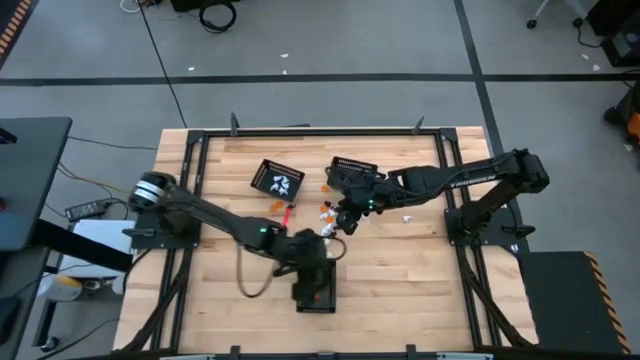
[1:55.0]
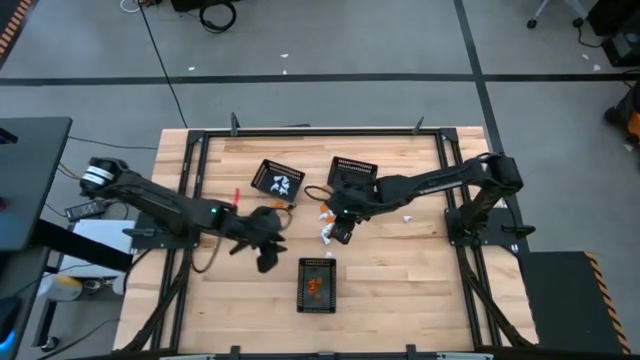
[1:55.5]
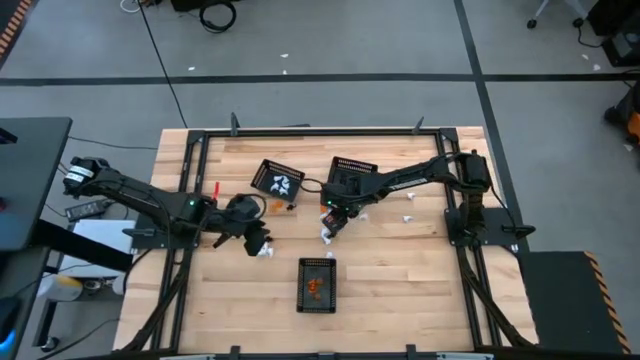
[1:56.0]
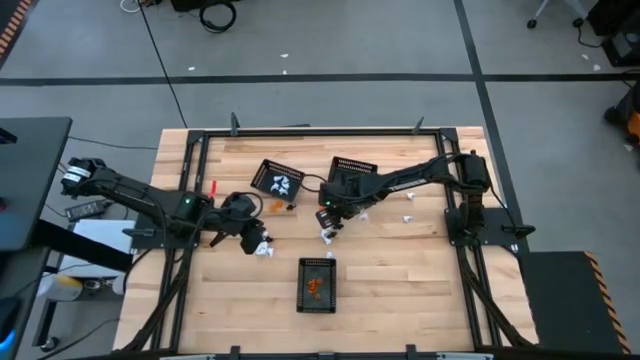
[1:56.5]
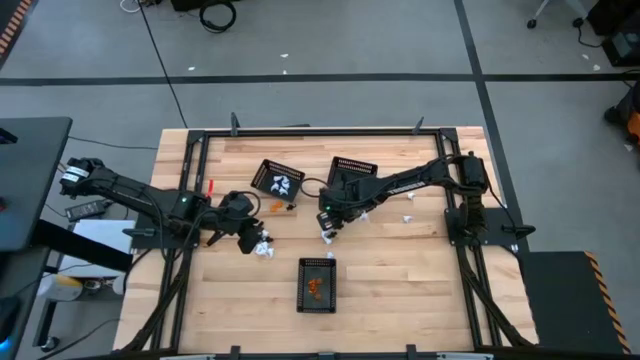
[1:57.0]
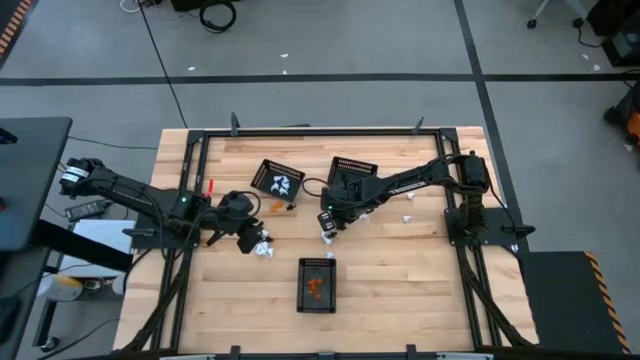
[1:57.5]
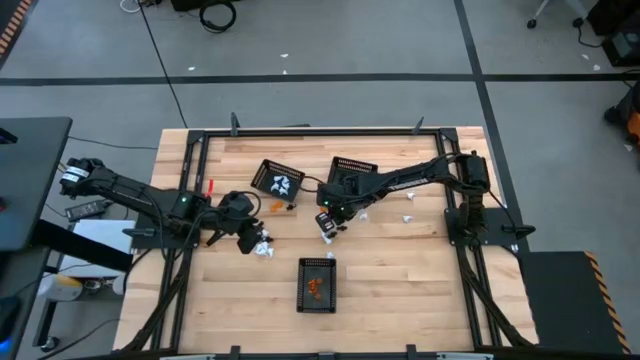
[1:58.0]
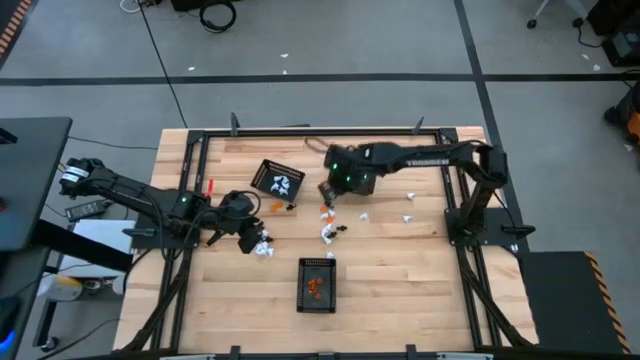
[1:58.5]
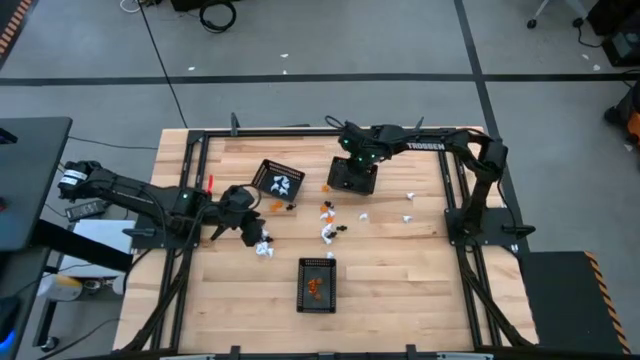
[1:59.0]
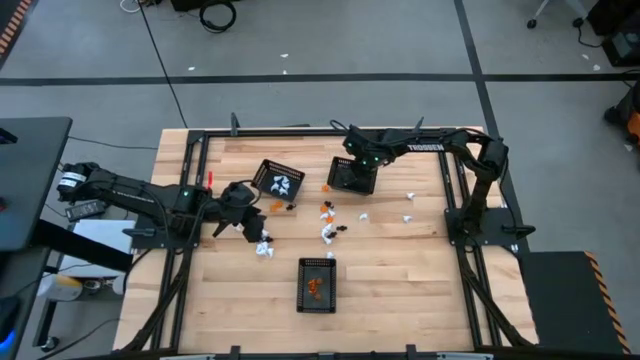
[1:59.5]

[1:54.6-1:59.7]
Task: Sort Halloween decoration
Put the black skeleton toy into the top right black basket

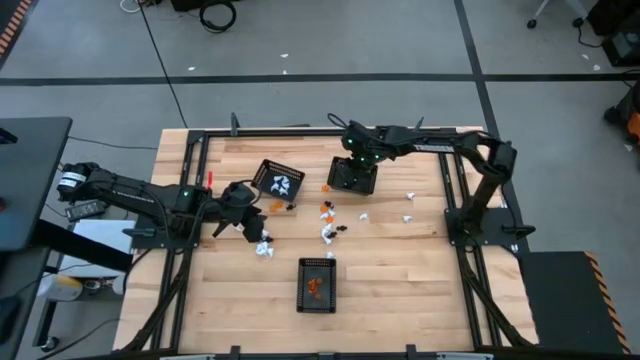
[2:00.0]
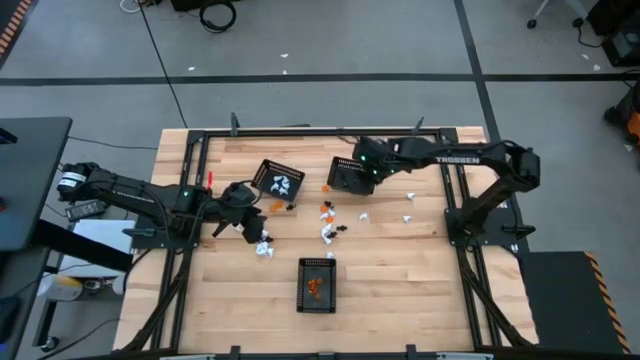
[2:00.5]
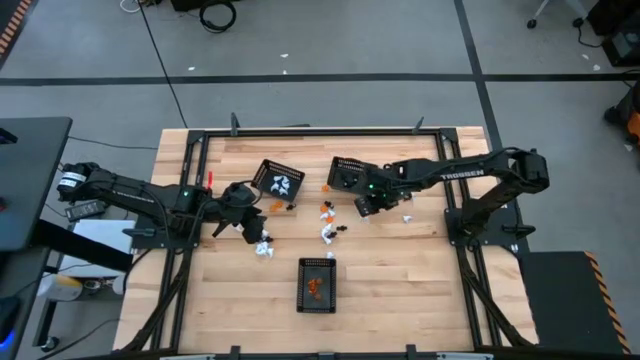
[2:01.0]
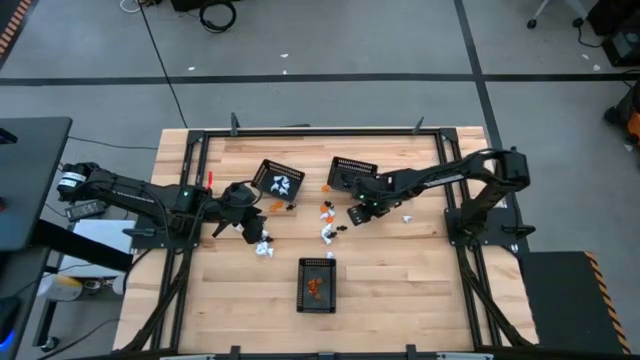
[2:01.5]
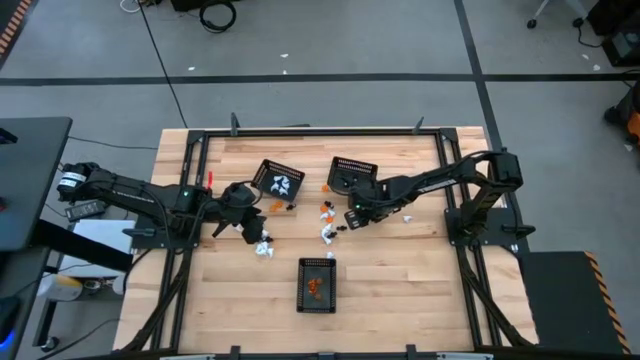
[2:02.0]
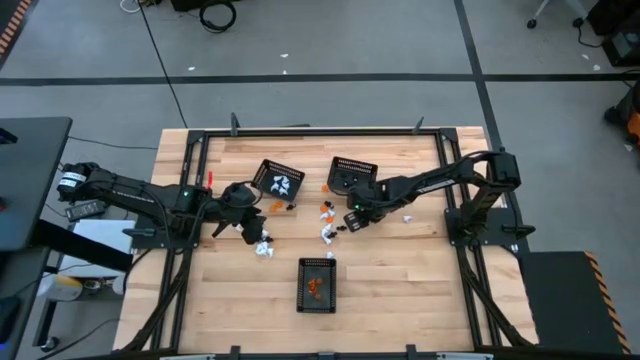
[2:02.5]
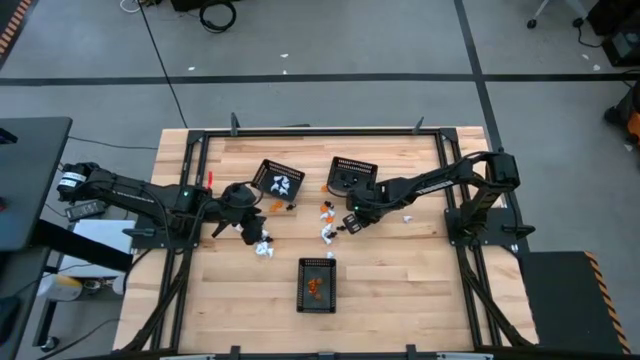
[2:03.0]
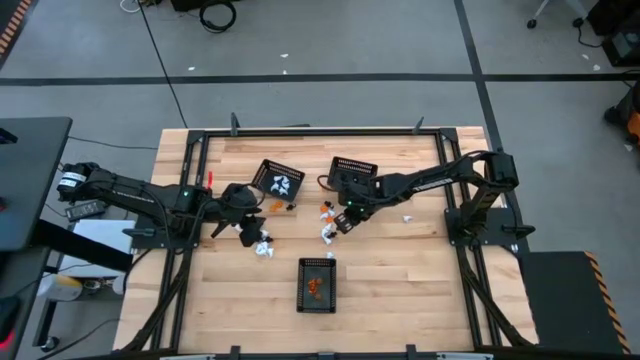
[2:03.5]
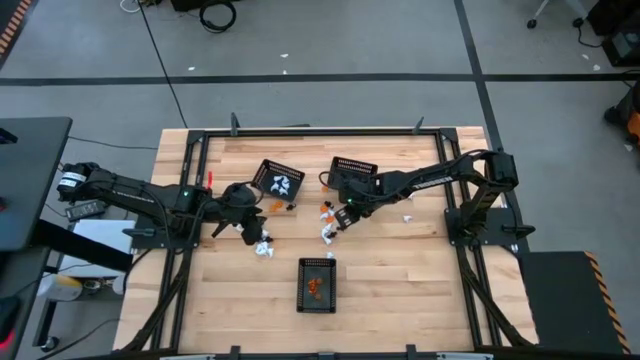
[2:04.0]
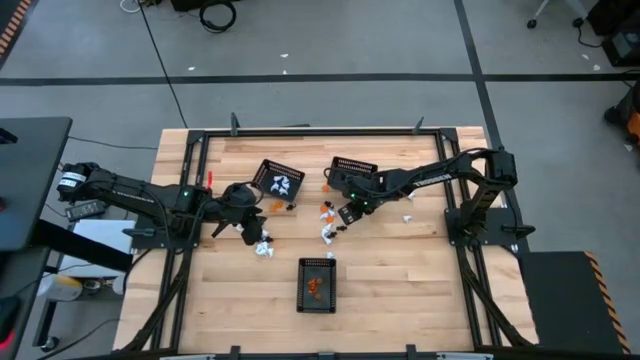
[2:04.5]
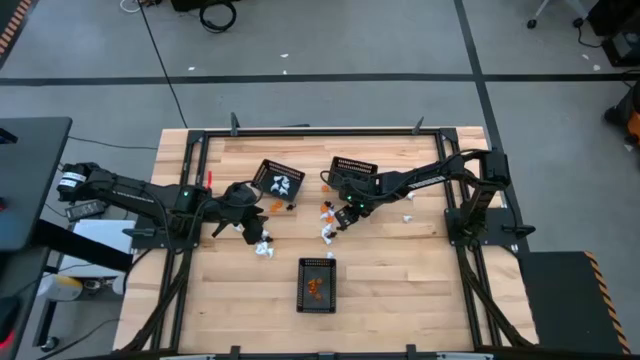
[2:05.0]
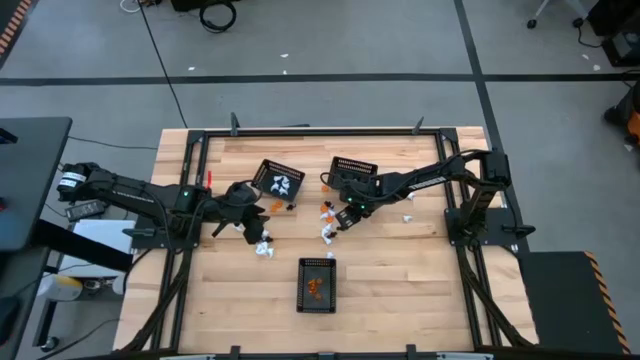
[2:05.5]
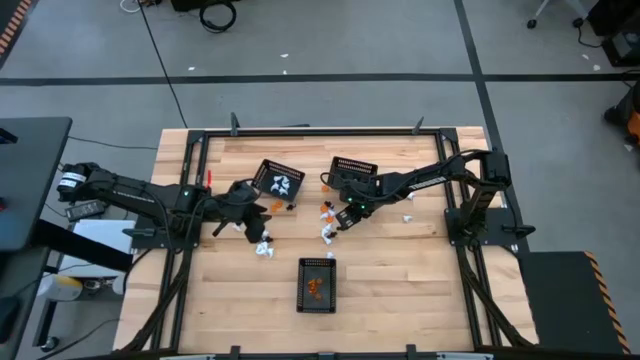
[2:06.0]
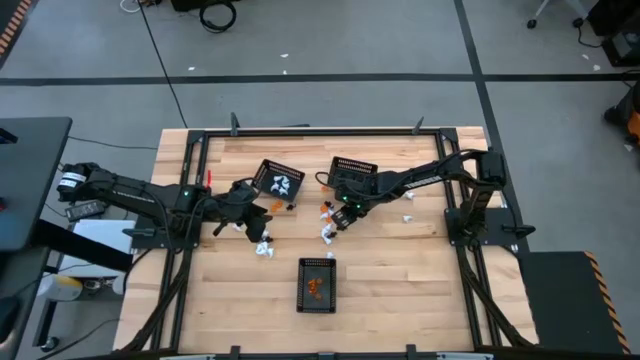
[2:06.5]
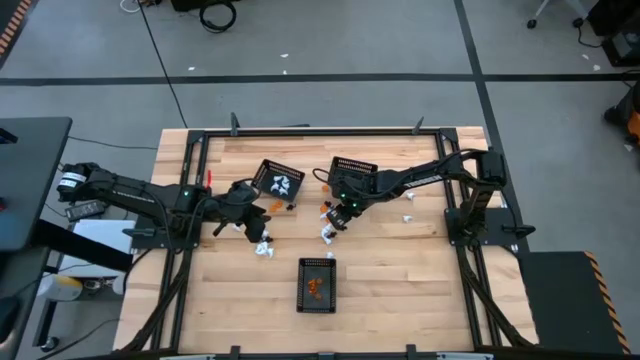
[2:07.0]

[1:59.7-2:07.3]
Put the white ghost toy into the top left black basket

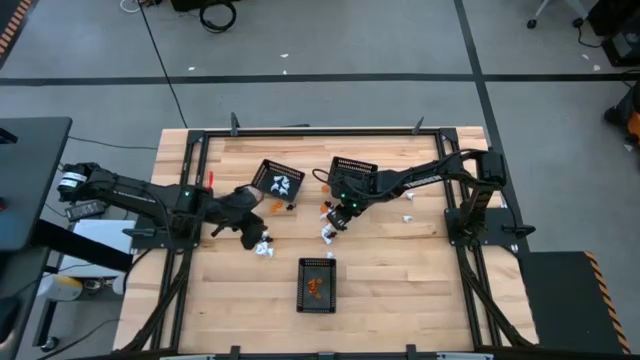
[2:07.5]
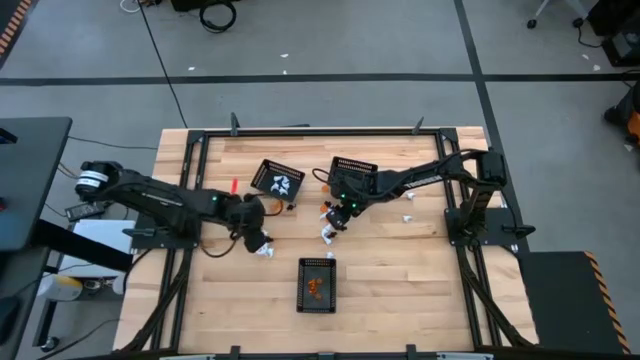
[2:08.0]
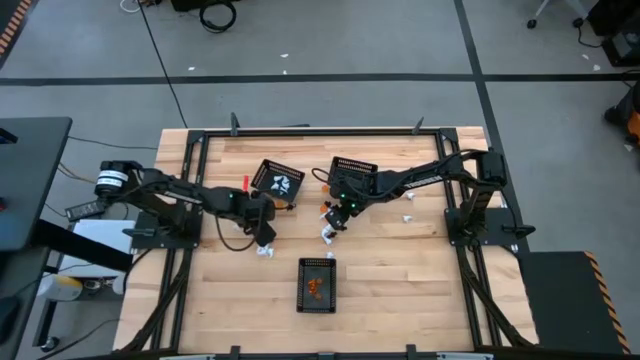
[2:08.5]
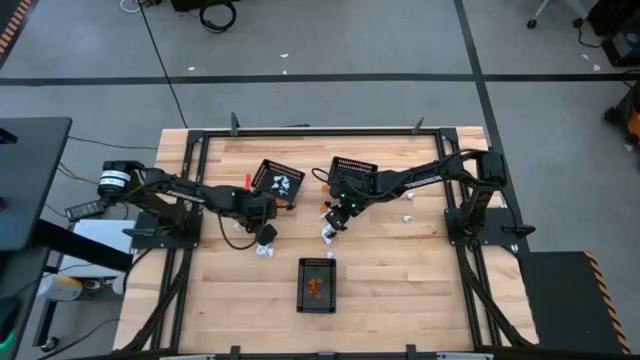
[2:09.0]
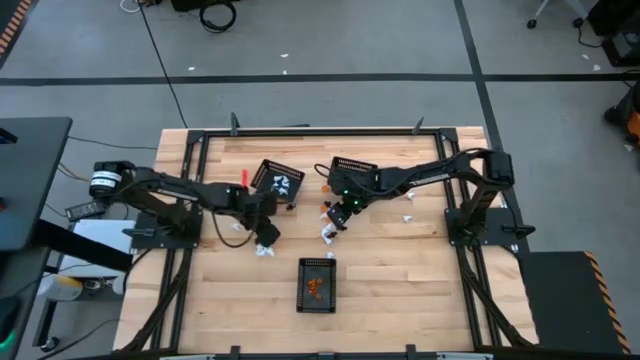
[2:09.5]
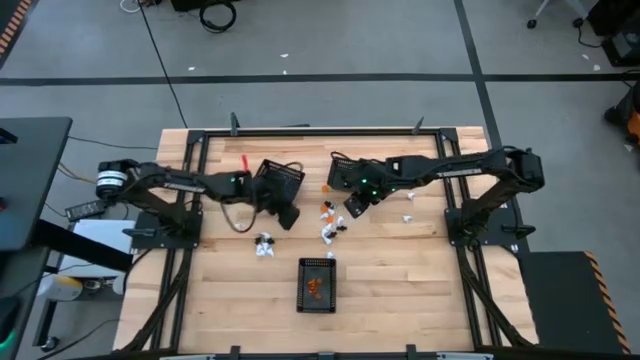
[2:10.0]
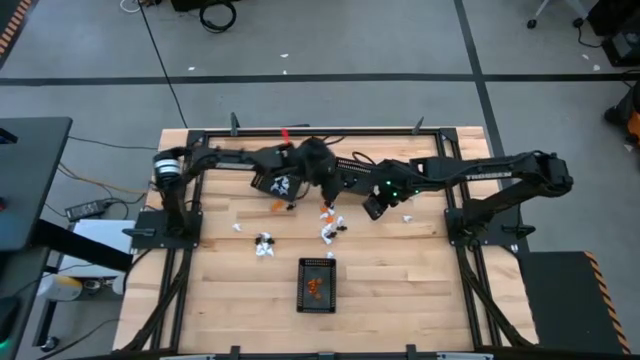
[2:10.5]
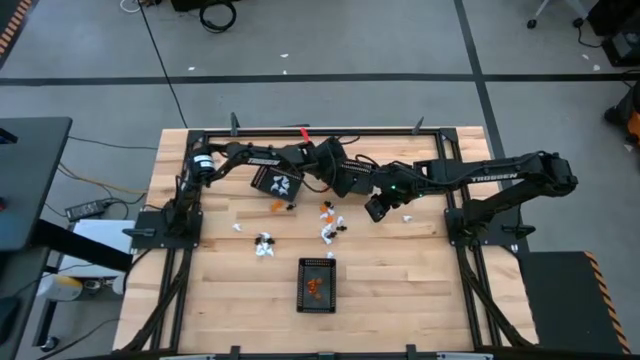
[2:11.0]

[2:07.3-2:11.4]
Put the black skeleton toy into the top right black basket

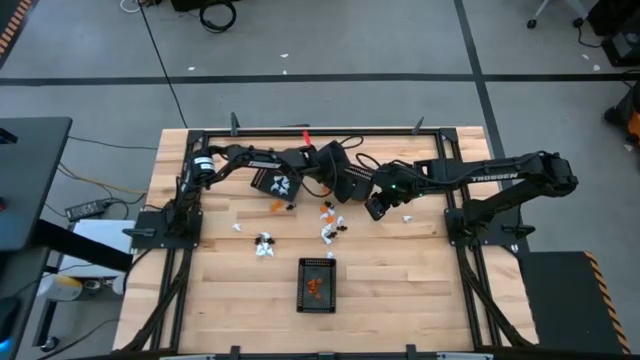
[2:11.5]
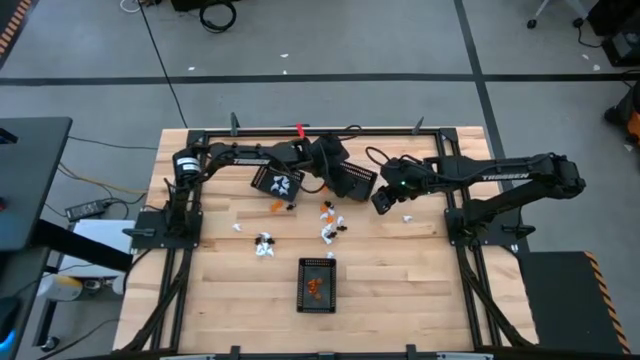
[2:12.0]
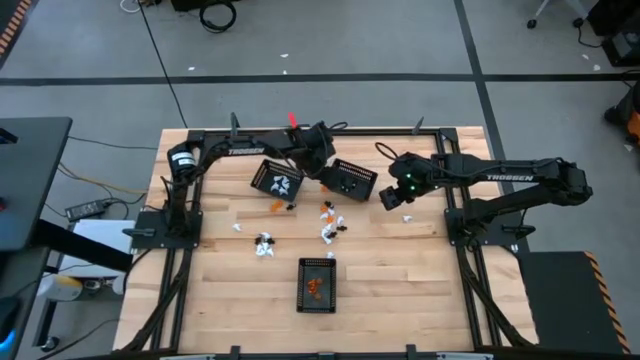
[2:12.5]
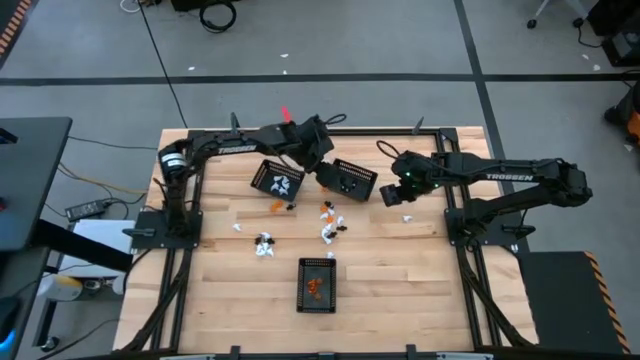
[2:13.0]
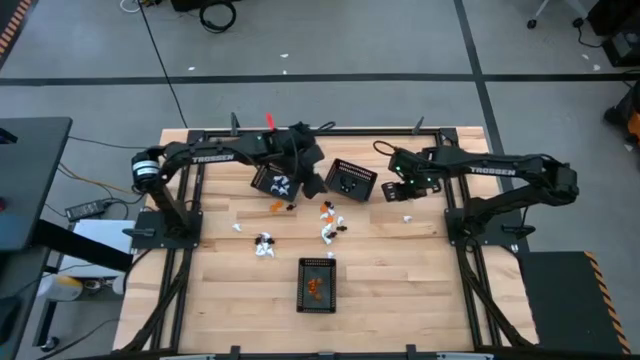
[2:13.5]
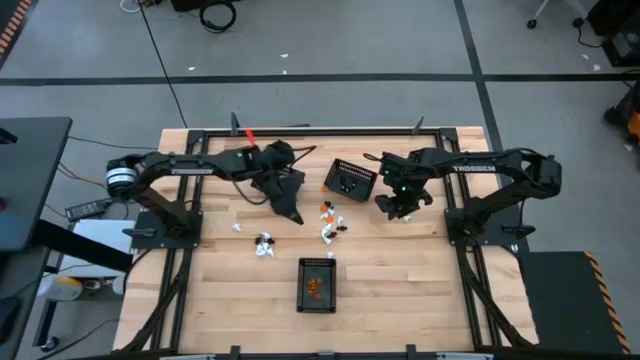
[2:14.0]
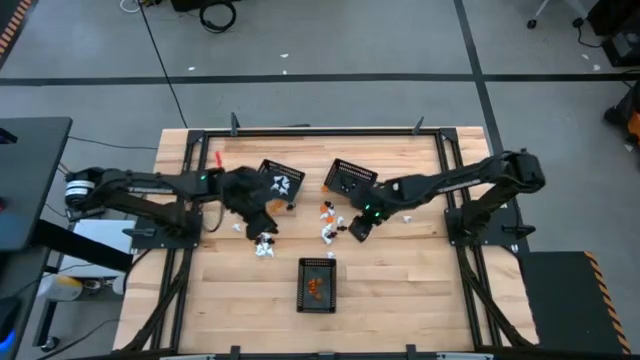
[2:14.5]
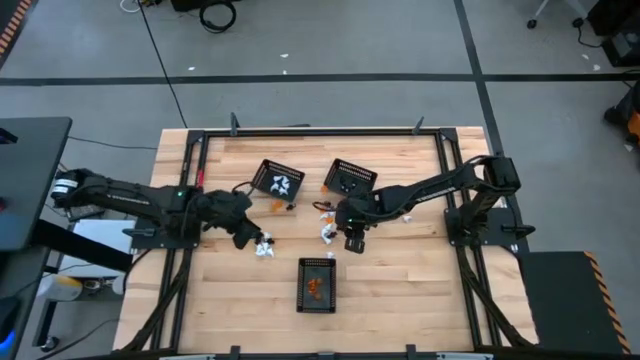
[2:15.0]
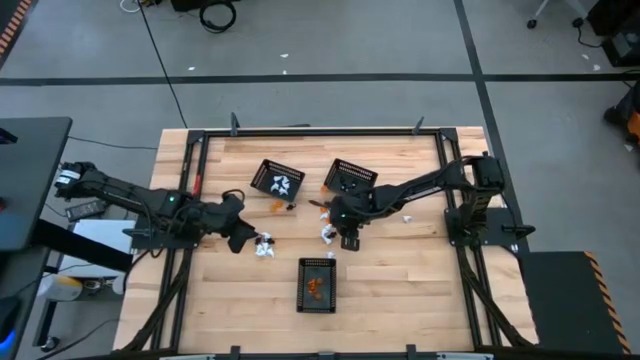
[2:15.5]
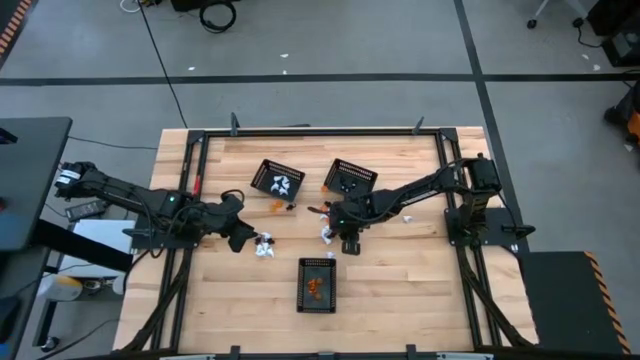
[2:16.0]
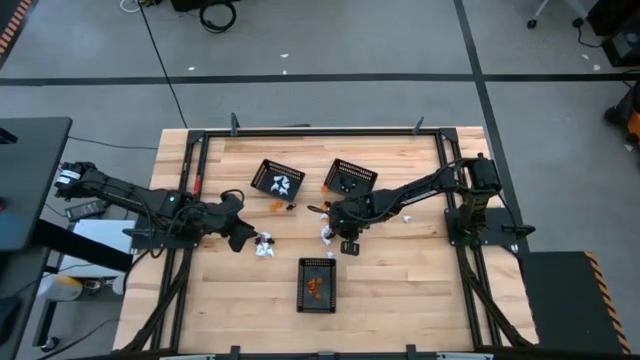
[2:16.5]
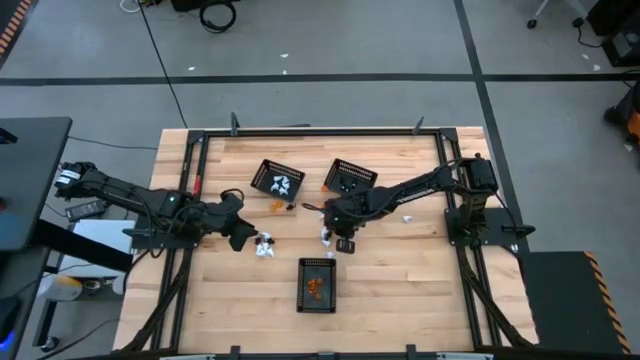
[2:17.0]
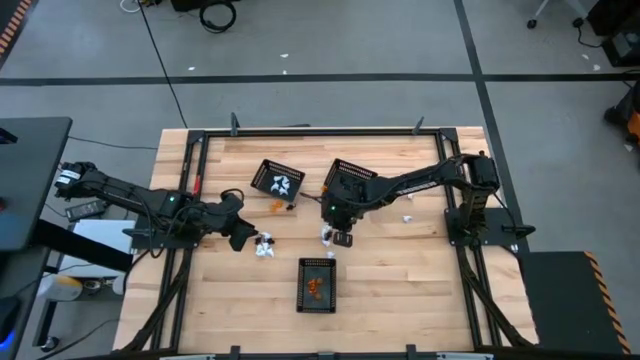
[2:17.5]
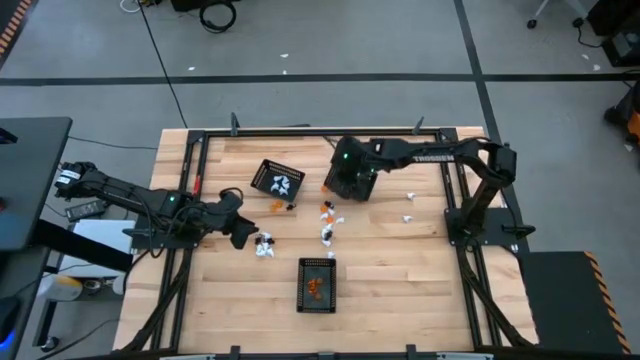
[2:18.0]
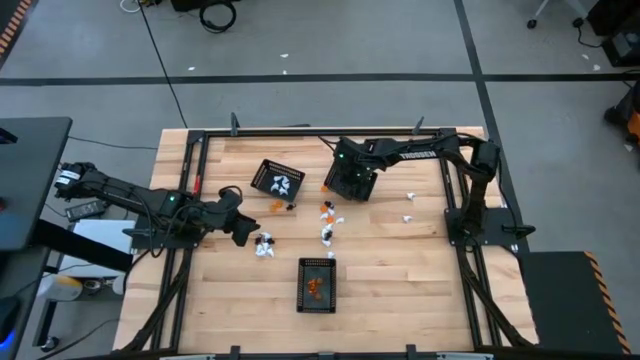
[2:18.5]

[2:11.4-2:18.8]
Put the black skeleton toy into the top right black basket
